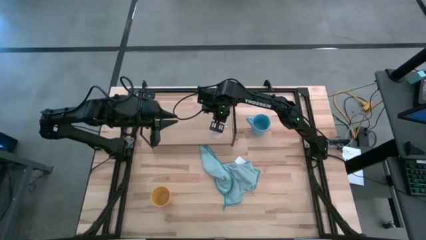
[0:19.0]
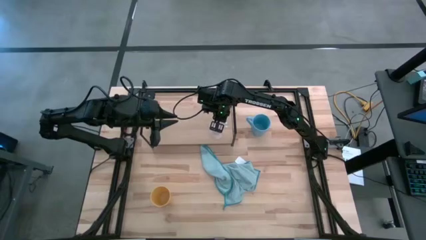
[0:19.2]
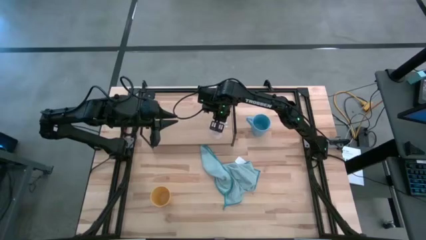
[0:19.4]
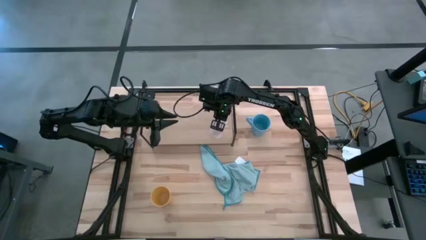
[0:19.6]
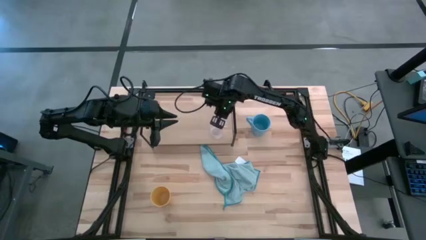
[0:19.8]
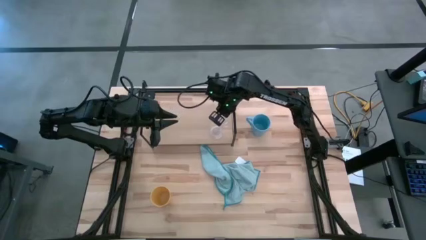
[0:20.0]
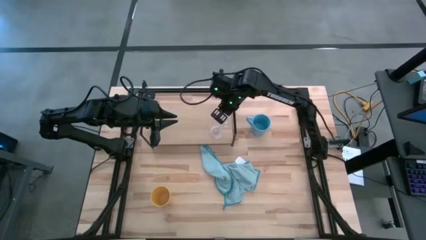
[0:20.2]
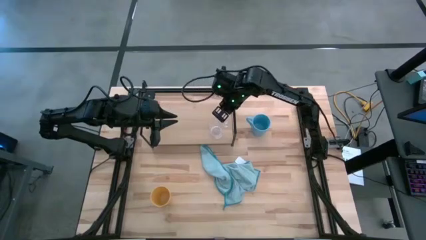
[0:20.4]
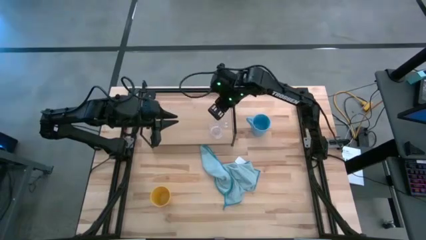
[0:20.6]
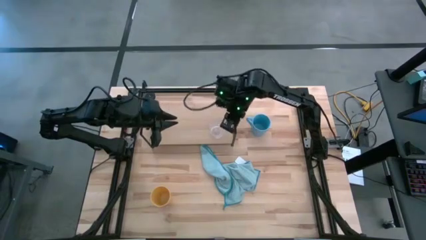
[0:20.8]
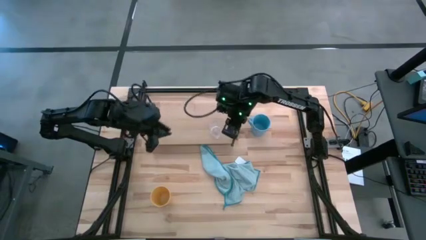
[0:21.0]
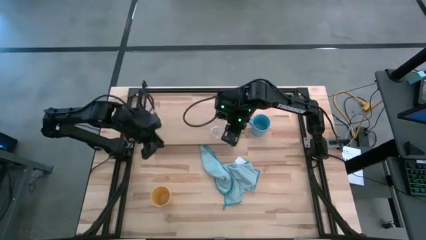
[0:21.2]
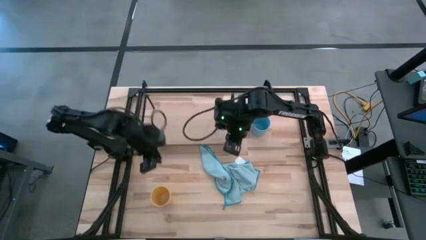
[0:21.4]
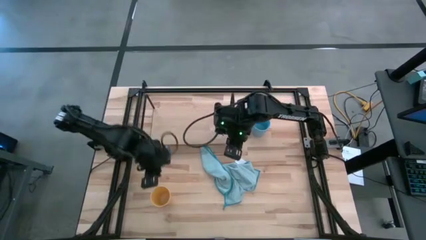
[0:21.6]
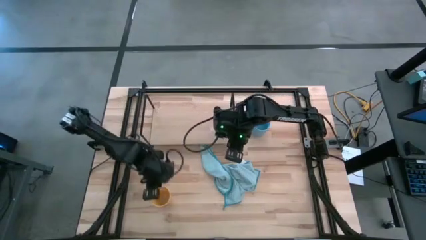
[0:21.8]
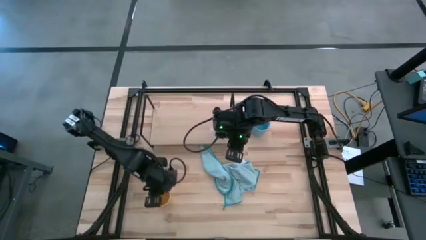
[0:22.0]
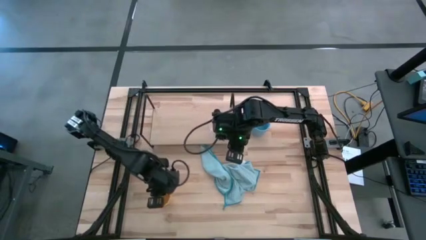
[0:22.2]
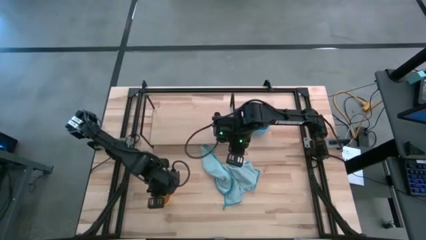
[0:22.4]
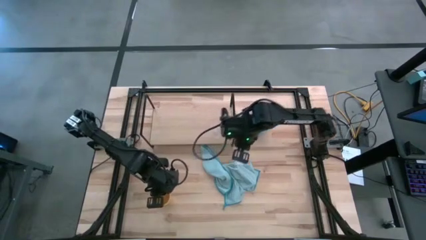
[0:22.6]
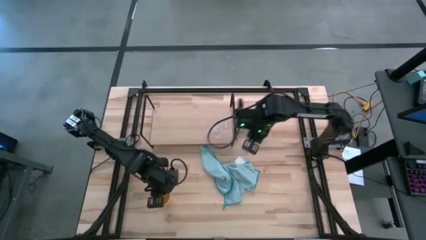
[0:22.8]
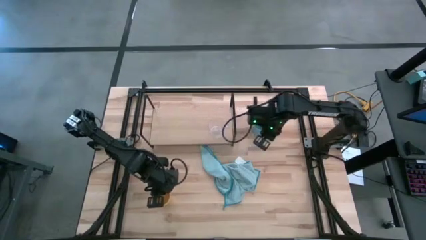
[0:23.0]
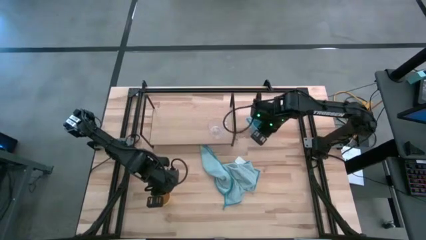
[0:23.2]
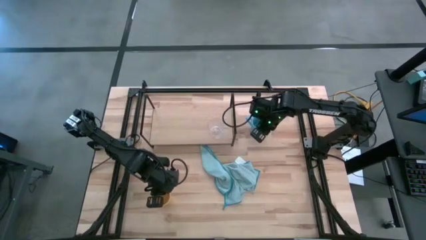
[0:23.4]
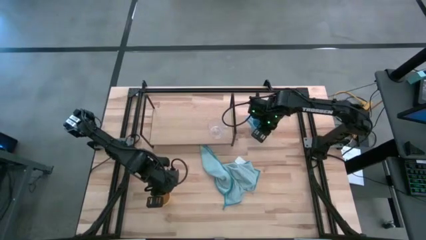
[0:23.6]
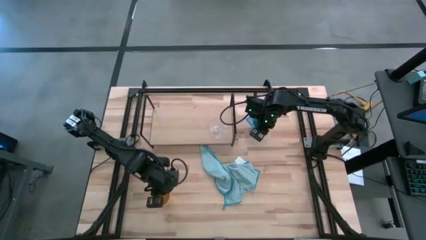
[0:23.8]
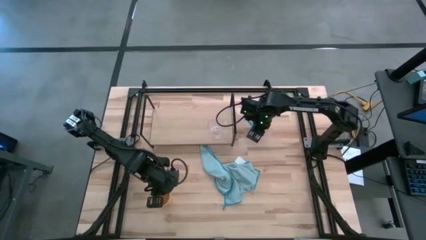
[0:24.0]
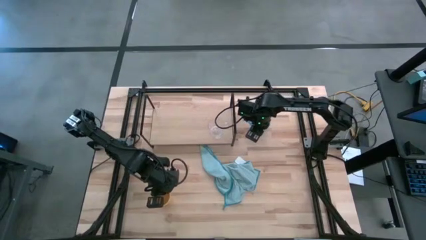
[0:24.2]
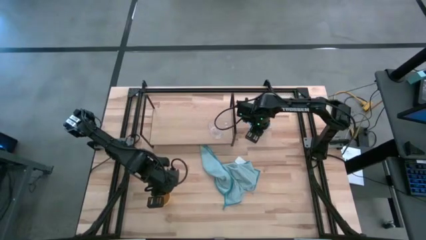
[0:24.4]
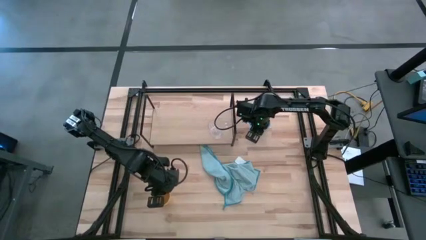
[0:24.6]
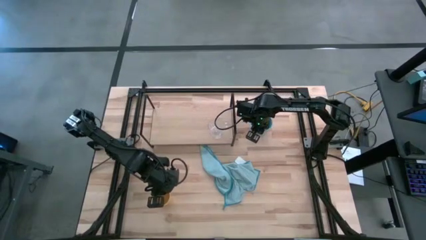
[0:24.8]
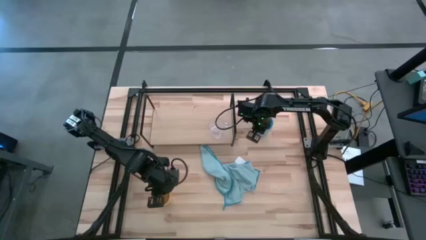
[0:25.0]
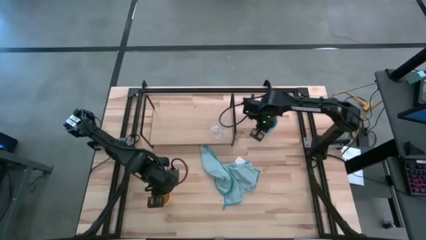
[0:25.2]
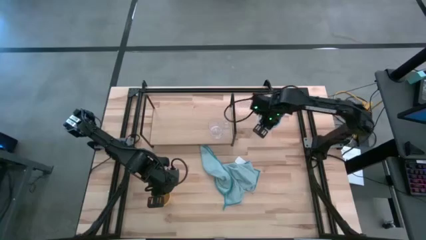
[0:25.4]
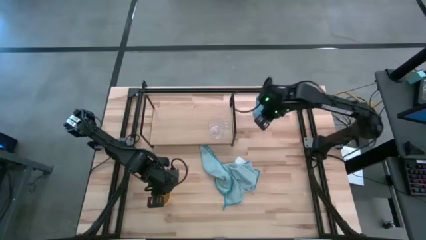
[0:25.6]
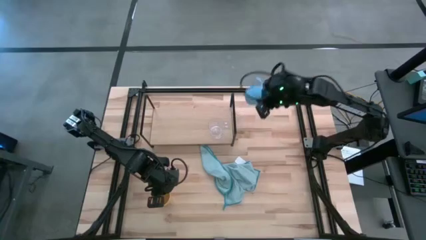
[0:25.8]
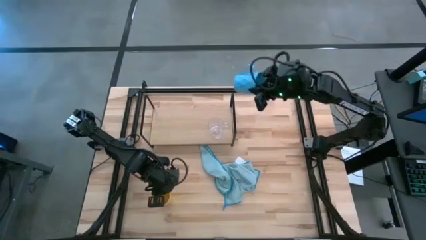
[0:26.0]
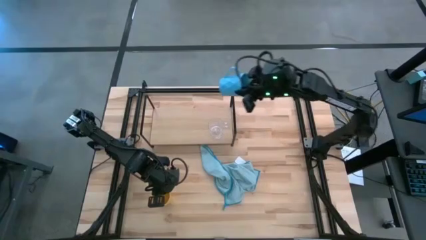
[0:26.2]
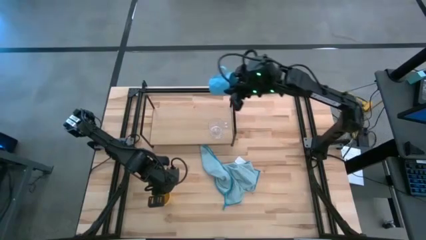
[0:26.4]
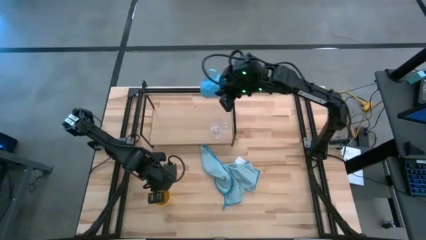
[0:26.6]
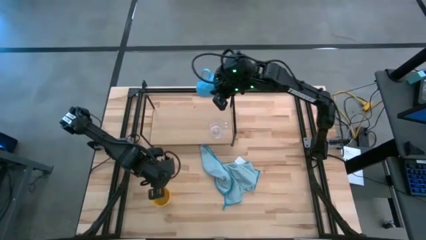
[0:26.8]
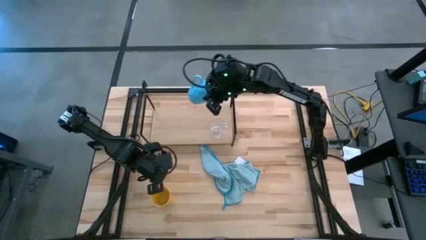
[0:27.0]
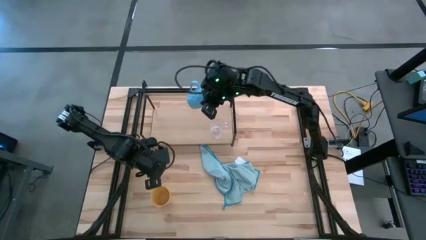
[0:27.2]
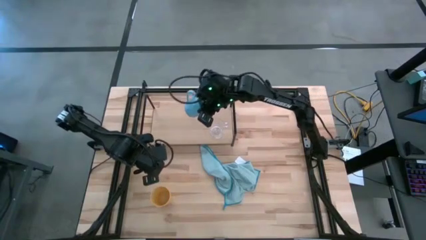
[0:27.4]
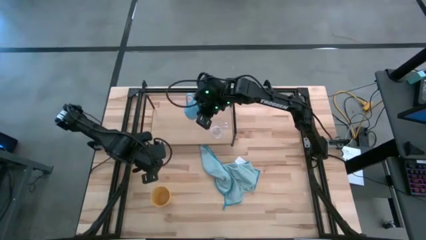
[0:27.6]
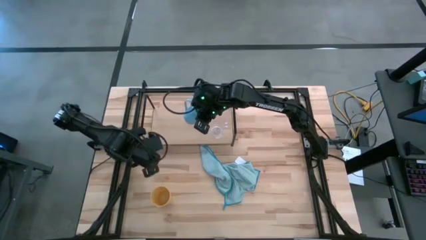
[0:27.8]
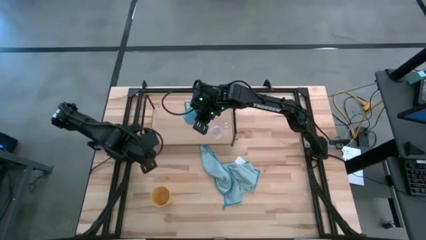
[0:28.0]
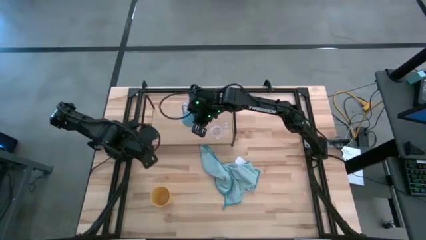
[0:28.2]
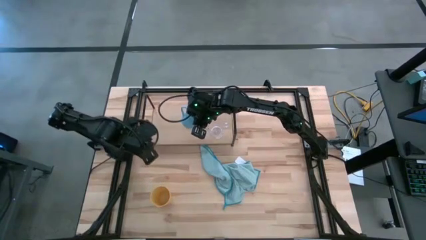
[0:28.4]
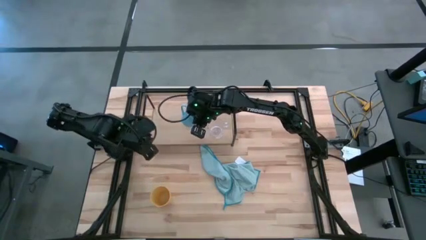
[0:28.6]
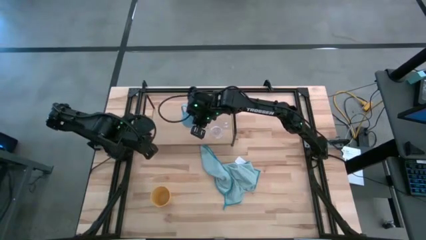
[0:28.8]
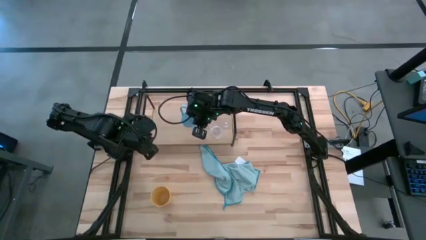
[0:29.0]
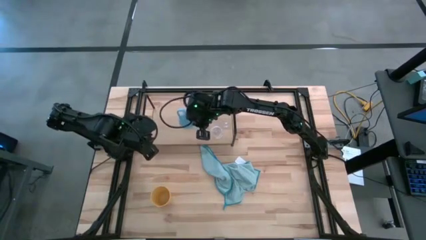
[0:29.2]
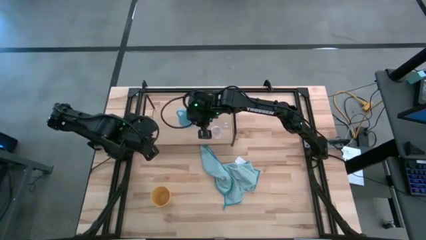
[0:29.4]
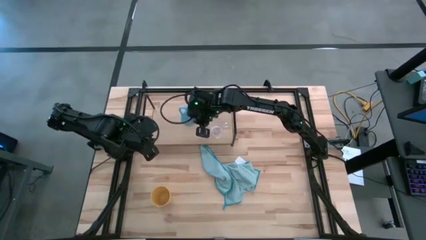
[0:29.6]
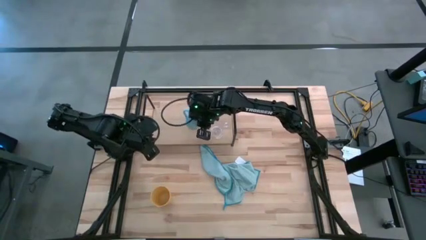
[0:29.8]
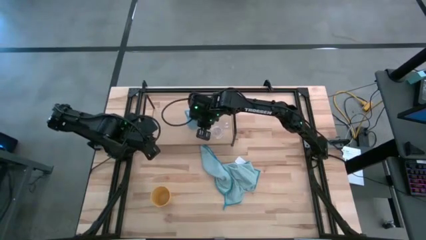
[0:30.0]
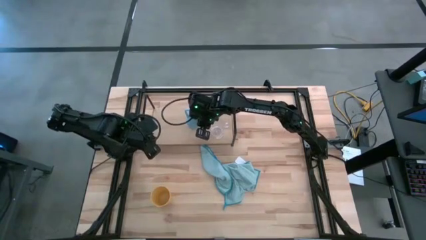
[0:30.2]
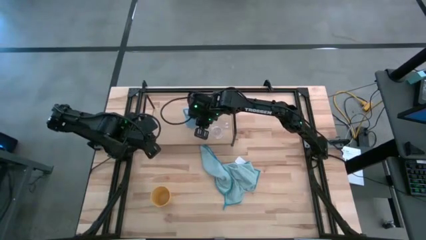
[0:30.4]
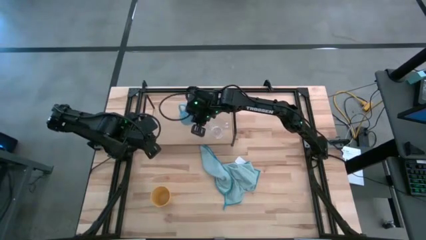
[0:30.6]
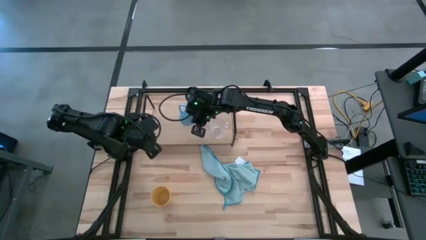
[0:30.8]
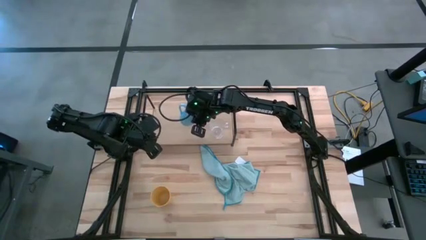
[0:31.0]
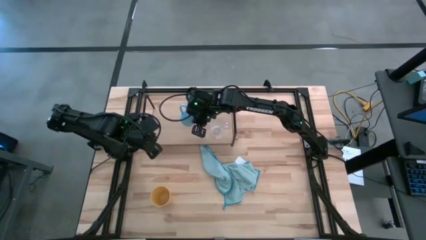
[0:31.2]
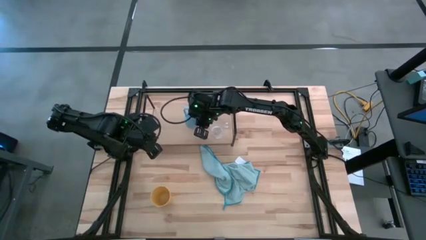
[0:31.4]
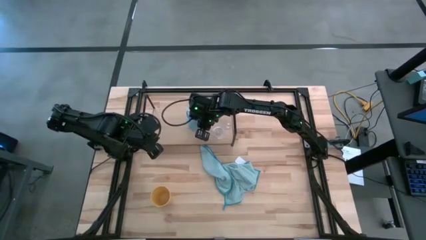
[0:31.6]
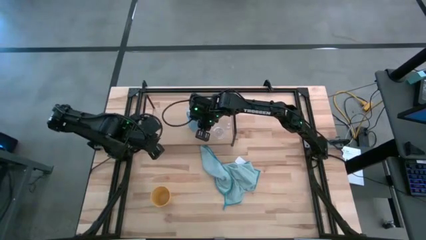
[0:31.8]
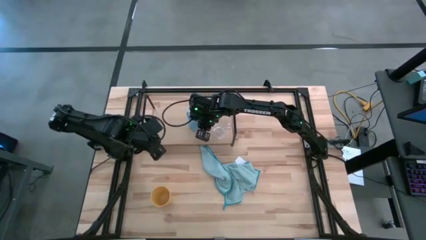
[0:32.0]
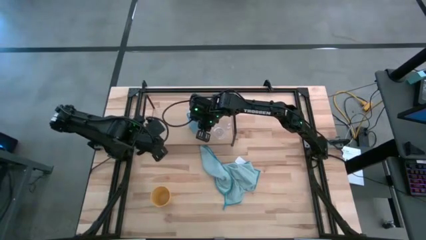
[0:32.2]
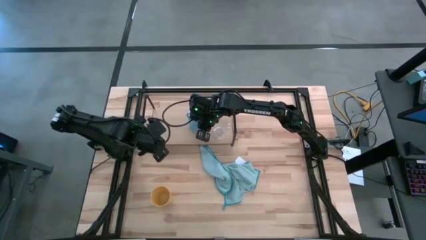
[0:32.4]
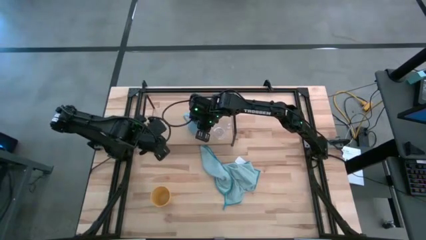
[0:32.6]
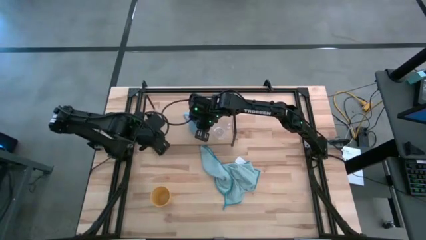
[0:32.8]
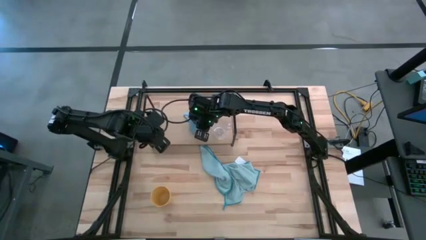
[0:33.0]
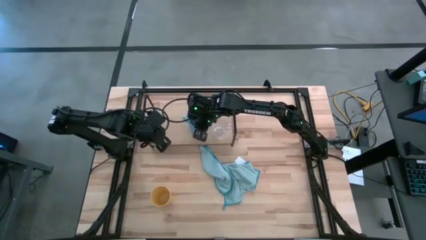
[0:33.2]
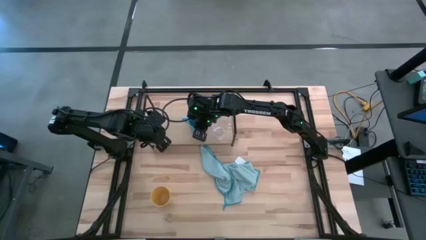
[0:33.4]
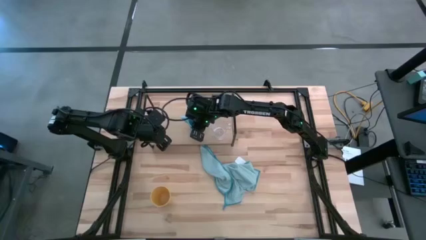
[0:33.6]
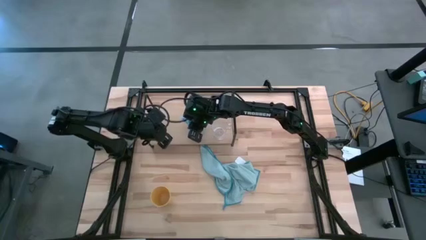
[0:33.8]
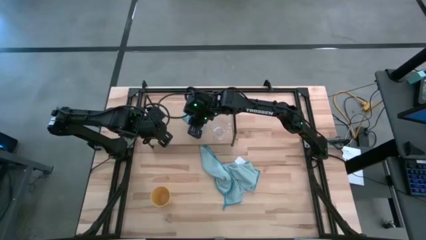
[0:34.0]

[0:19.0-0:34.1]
Task: Stack small to large cups/mugs on shelf
Put the blue cup on the shelf
